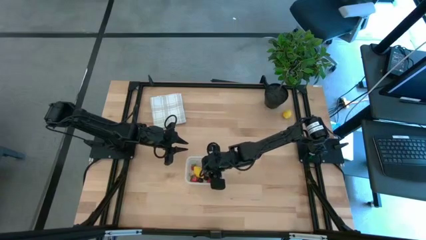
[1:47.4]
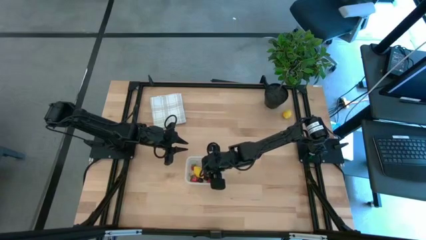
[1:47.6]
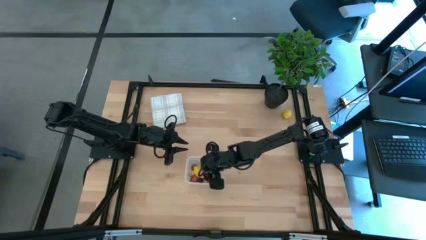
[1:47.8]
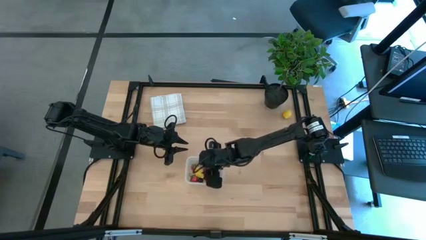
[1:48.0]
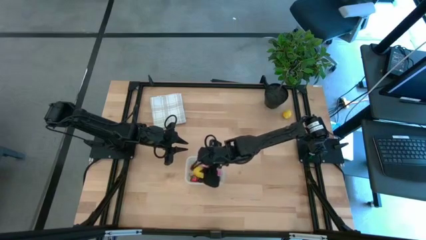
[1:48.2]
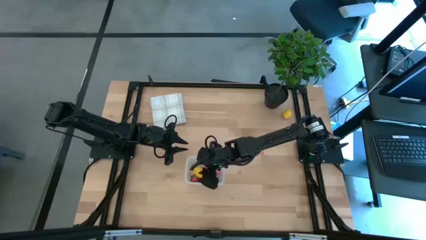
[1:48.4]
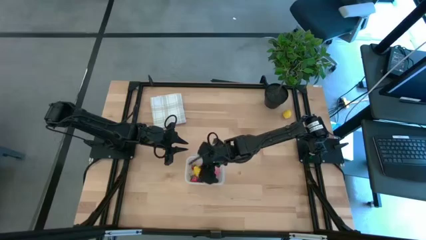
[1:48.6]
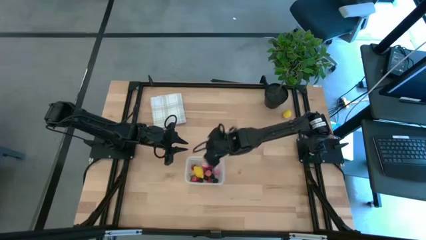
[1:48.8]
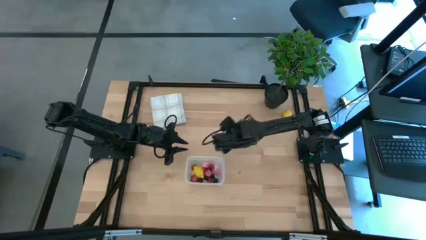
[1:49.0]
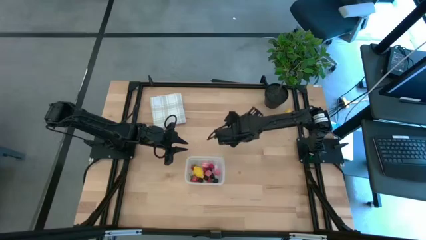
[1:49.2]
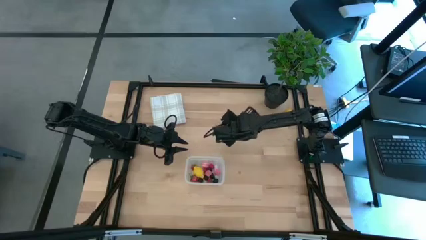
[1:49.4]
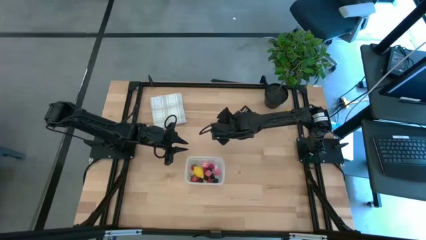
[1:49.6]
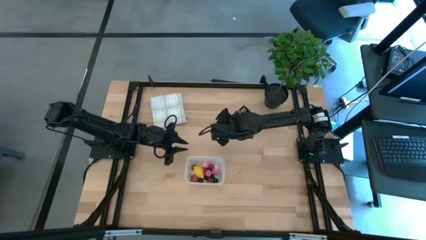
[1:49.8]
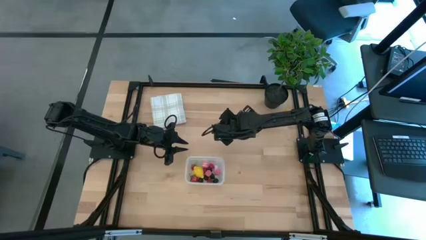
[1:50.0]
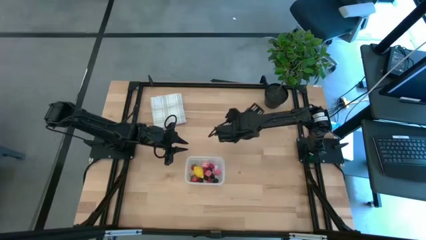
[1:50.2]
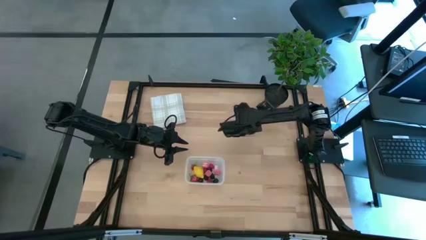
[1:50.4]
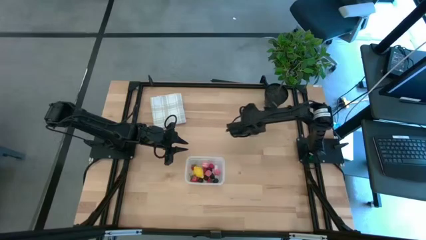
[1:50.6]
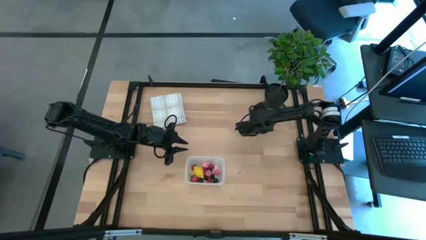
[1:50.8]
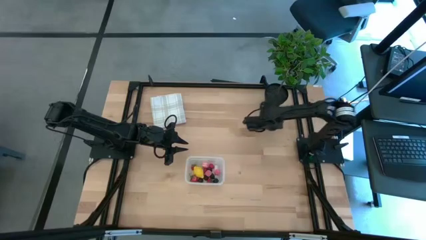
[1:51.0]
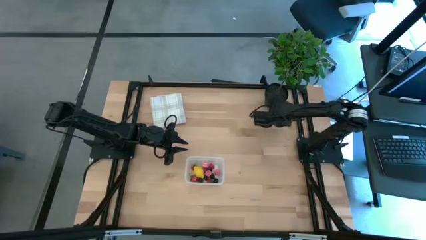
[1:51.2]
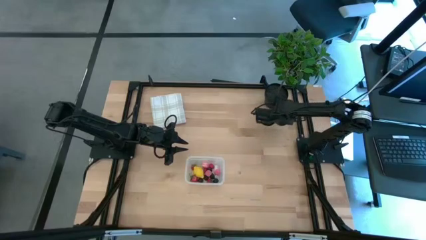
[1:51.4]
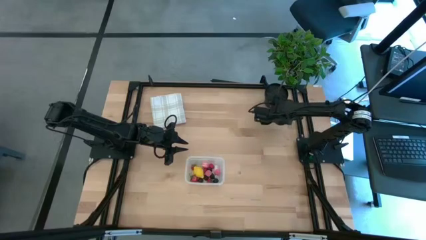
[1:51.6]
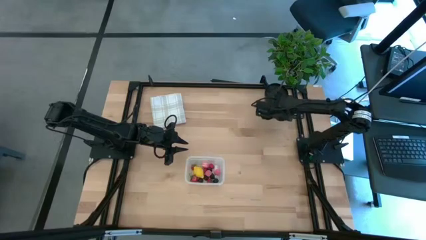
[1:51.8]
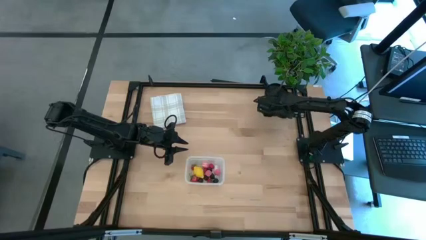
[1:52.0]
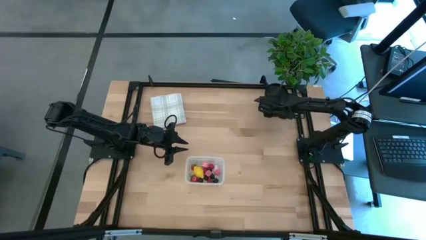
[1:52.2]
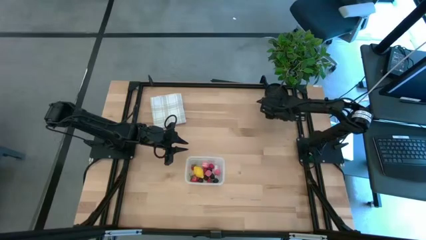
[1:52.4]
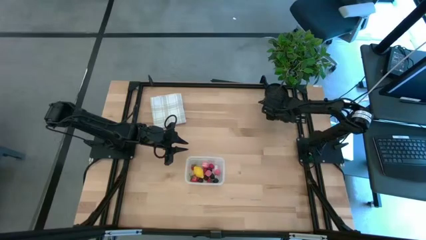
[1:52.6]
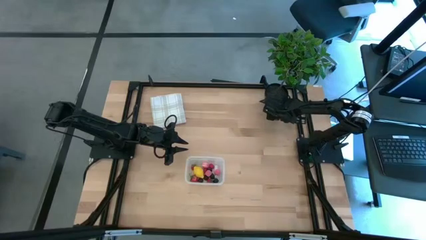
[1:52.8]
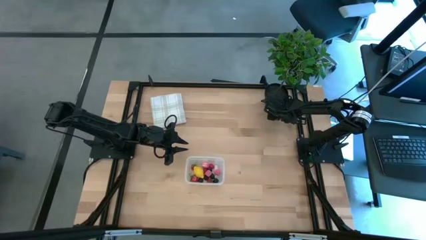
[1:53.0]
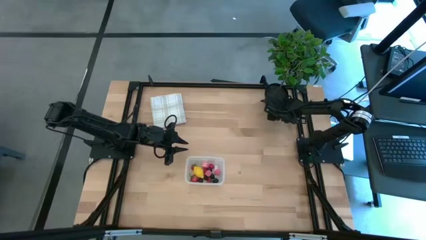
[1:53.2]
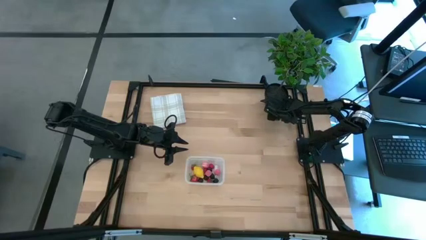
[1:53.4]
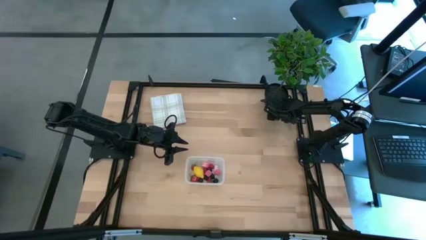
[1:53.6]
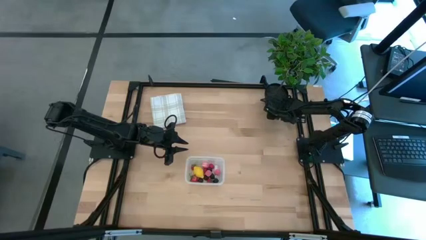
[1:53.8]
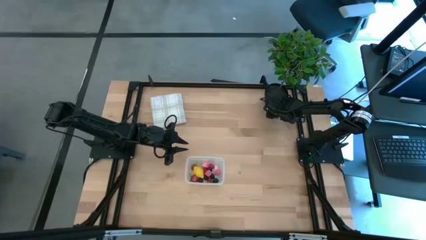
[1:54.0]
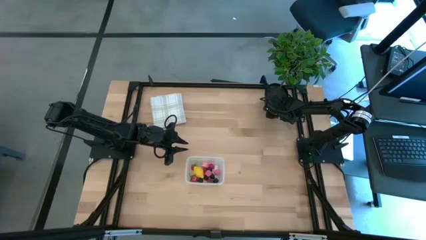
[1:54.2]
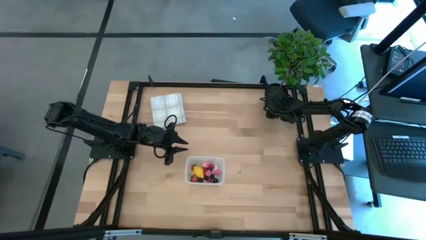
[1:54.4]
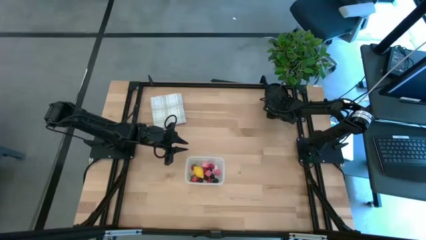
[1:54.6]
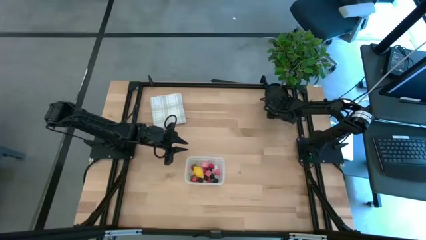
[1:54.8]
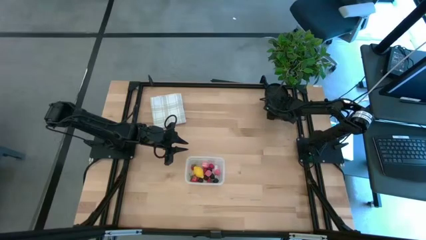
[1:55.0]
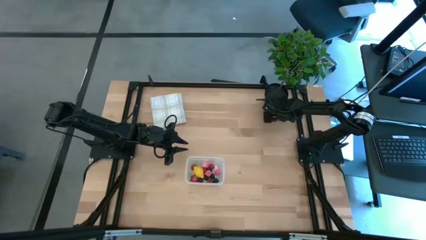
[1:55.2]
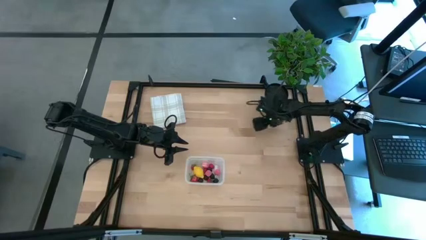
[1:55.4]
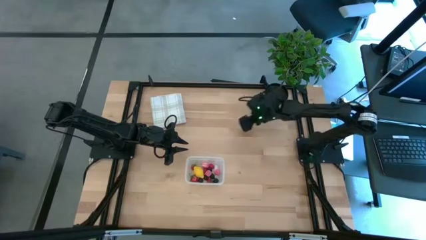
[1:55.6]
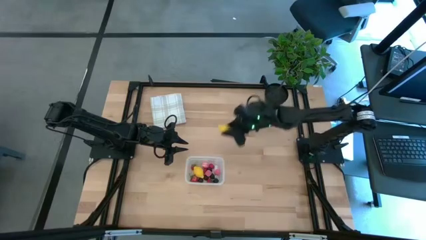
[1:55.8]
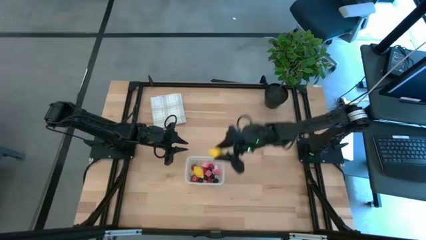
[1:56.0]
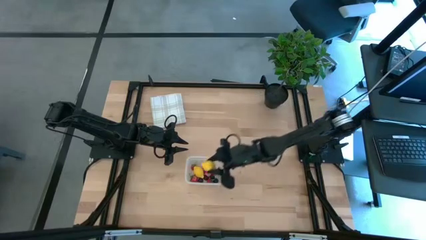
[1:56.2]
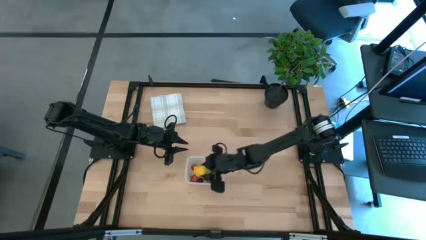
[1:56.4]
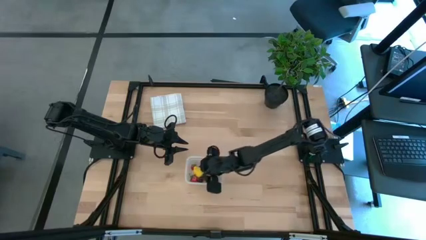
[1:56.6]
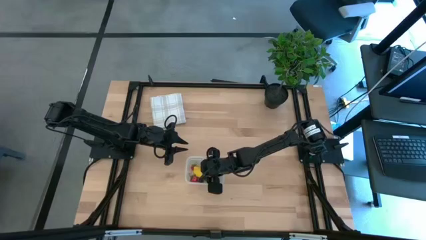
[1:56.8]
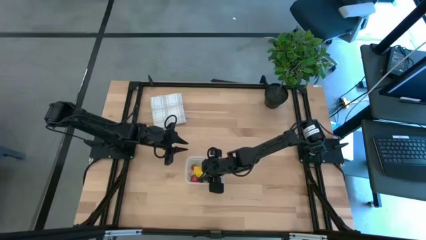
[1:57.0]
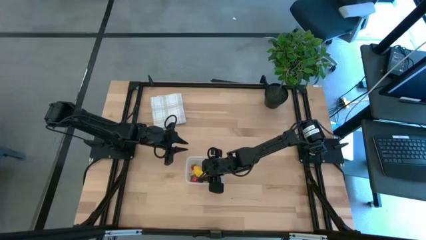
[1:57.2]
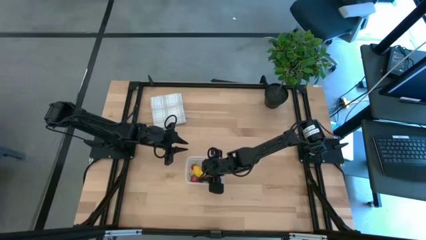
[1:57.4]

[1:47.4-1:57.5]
Task: Pick and placing Produce into tupperware
Put the lemon into the transparent bin

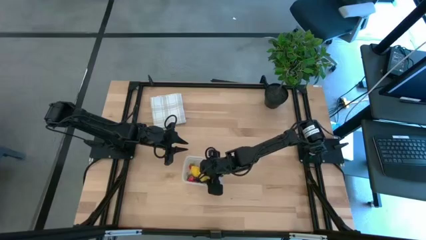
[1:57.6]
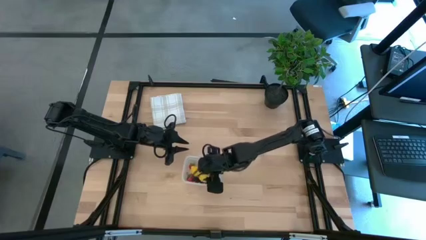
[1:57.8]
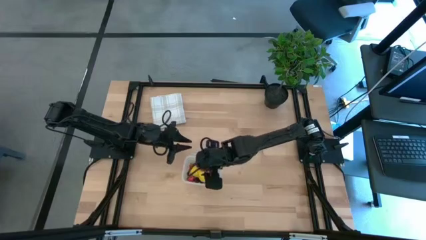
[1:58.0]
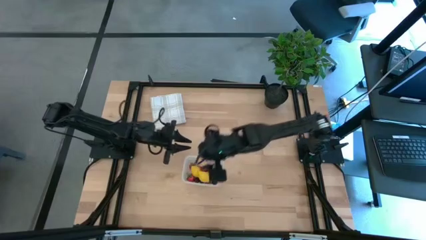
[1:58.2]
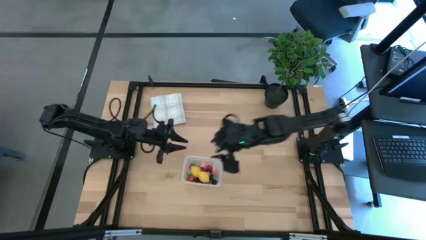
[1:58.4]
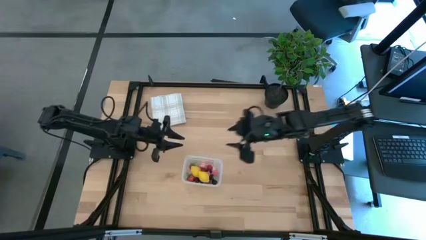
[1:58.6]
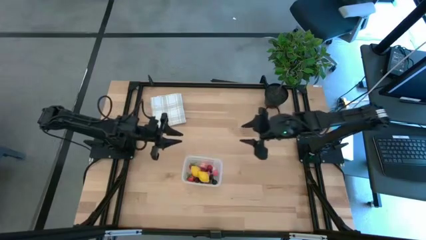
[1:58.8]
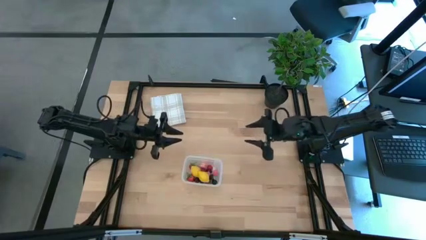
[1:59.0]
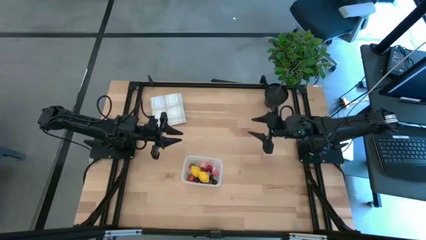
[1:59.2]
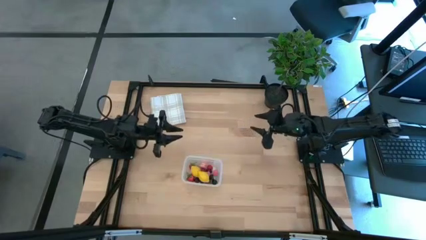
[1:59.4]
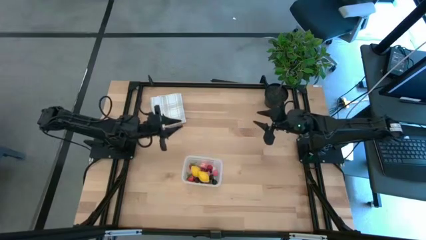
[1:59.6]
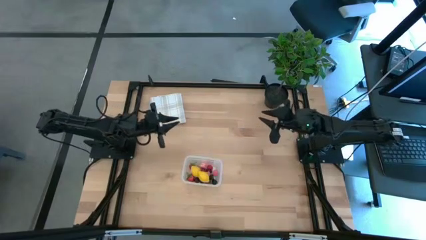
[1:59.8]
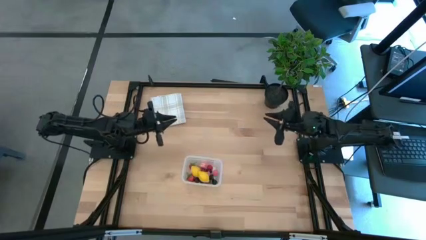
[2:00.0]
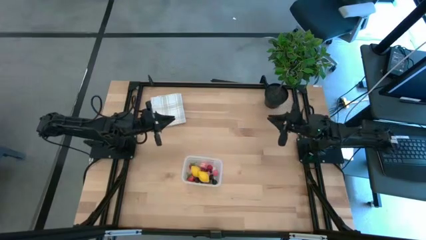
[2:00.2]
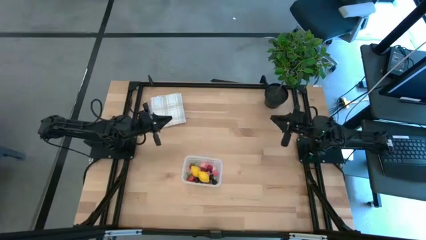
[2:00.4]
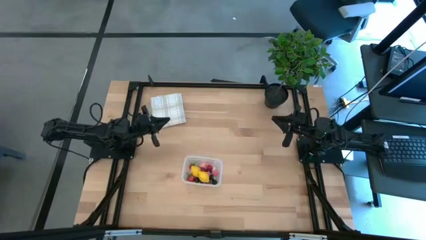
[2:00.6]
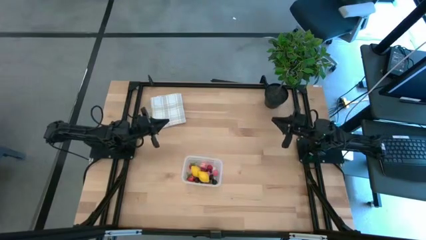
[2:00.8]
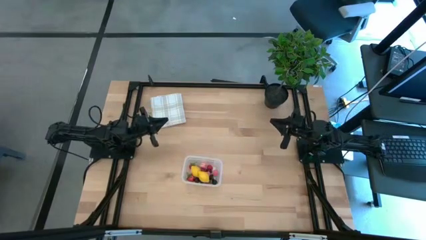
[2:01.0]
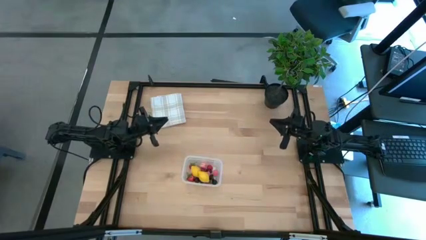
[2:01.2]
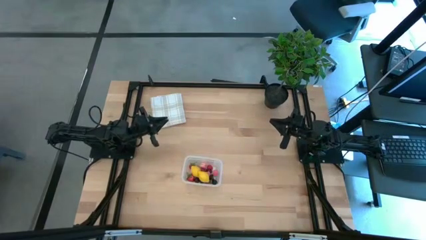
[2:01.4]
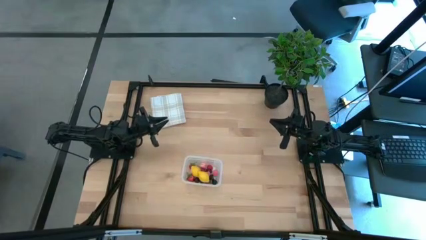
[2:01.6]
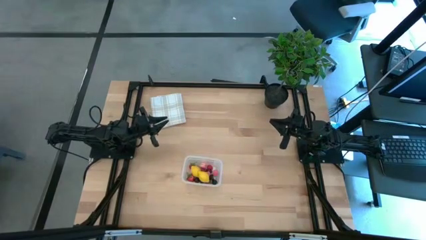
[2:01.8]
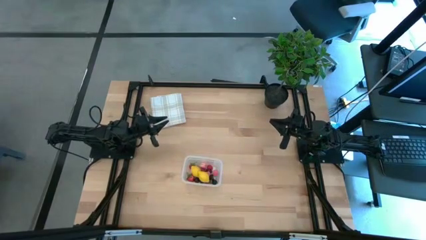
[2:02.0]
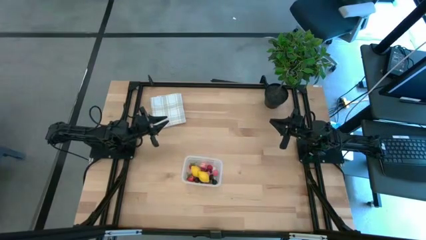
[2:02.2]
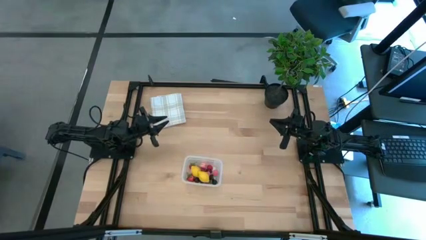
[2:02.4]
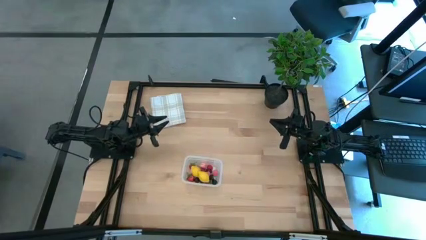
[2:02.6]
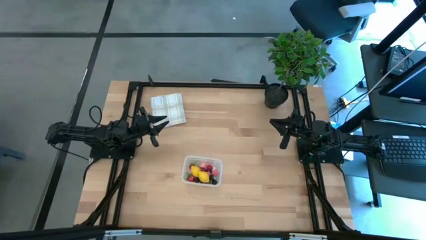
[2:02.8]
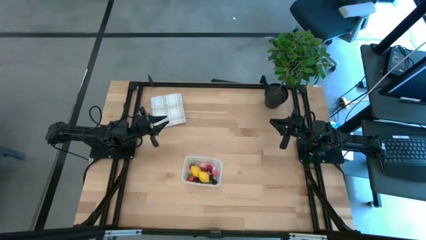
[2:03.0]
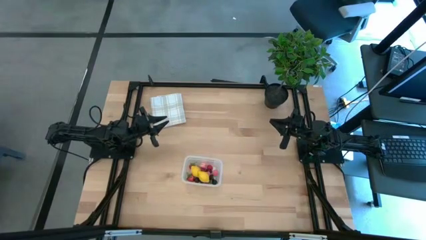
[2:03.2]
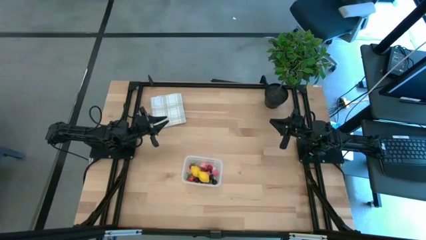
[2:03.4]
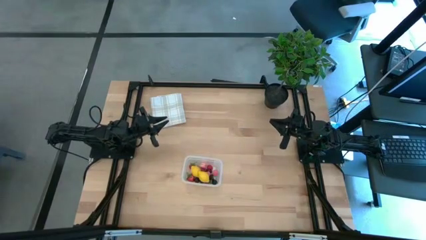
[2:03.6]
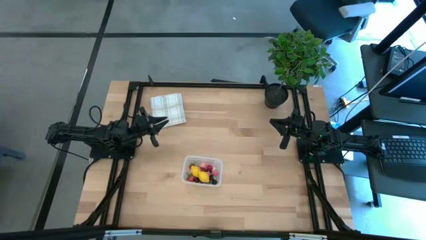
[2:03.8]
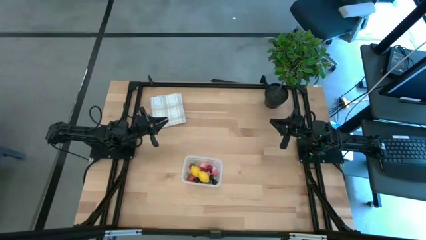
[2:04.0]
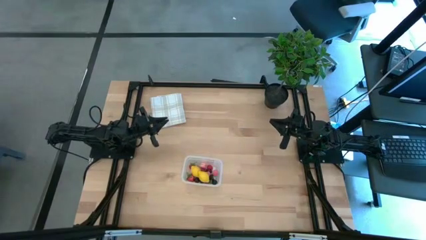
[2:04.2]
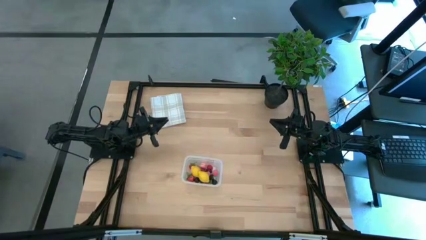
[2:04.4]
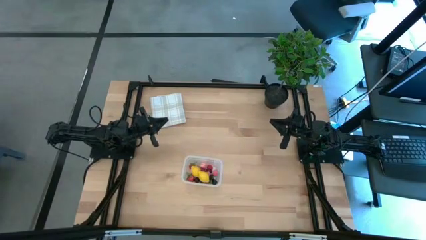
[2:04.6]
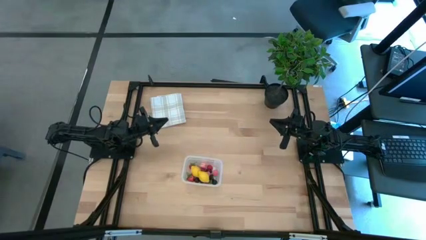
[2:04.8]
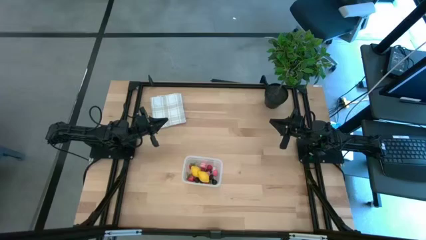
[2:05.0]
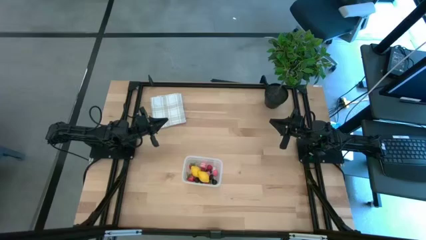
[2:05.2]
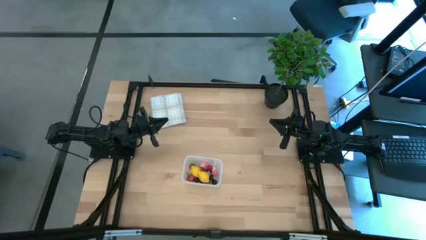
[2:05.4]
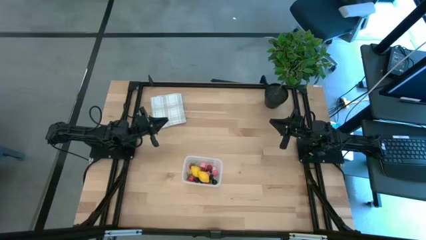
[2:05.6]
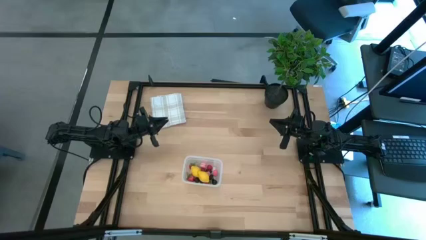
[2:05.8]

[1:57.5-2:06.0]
Return to home position
